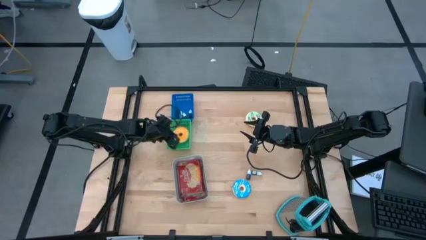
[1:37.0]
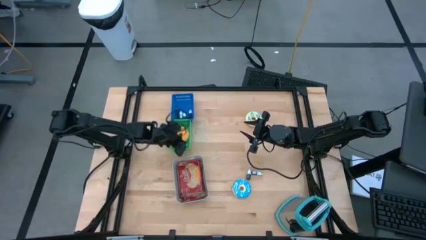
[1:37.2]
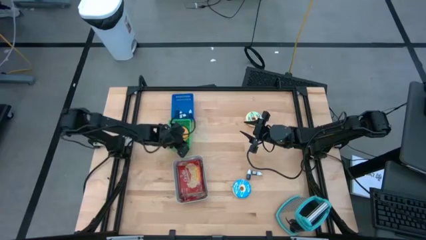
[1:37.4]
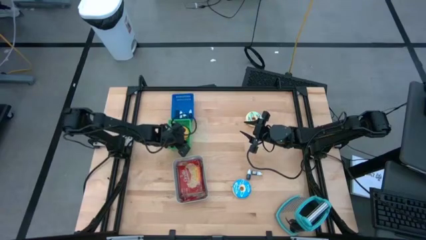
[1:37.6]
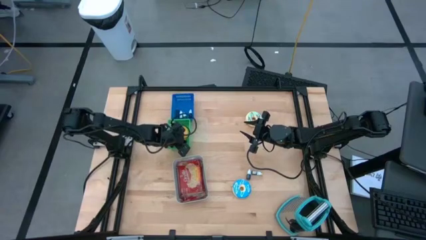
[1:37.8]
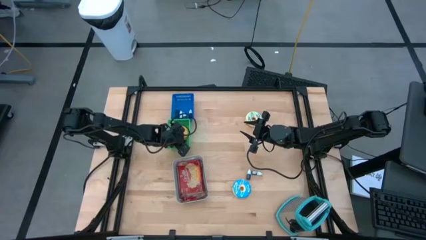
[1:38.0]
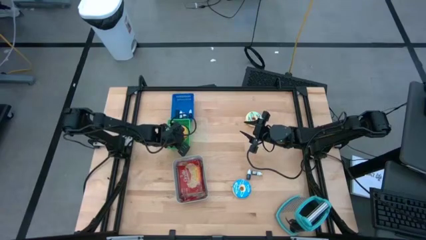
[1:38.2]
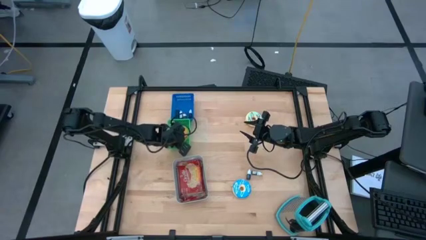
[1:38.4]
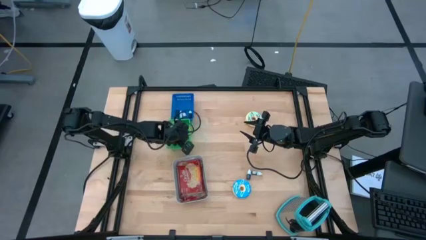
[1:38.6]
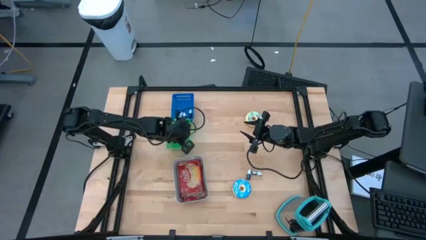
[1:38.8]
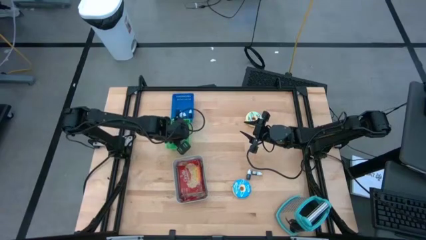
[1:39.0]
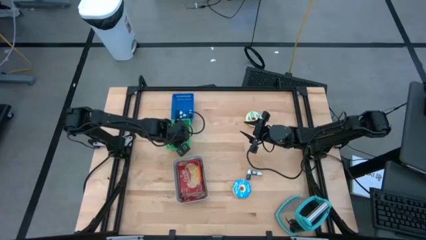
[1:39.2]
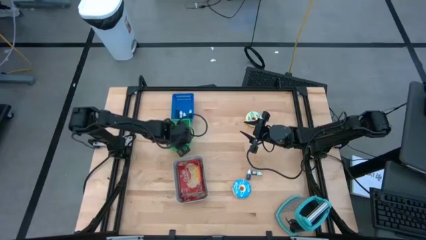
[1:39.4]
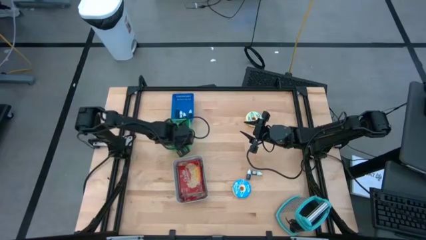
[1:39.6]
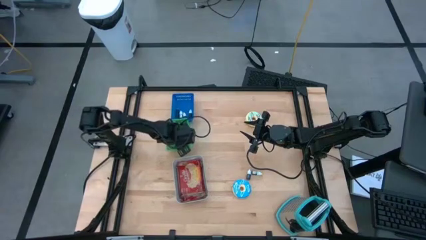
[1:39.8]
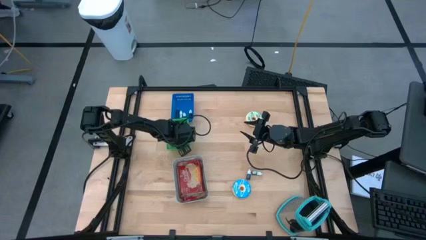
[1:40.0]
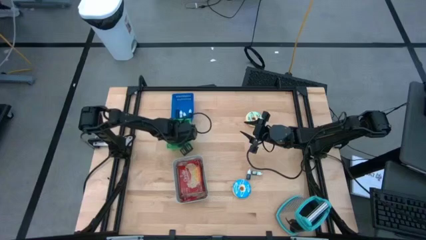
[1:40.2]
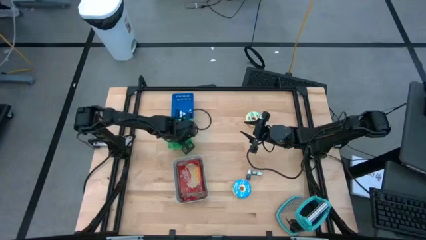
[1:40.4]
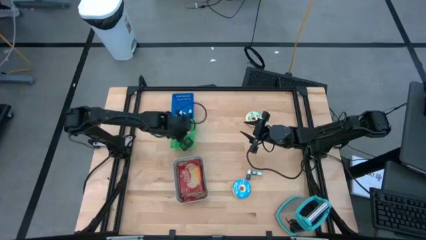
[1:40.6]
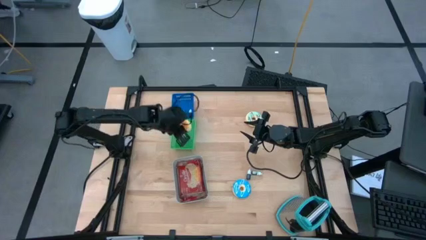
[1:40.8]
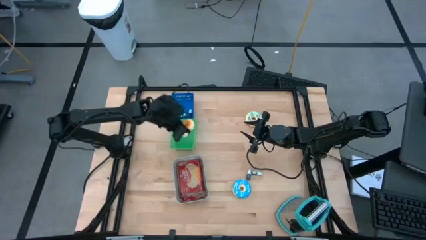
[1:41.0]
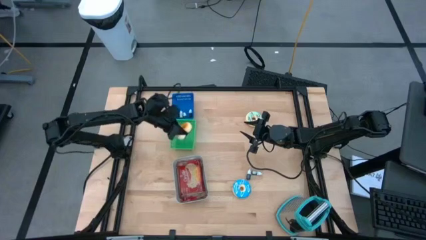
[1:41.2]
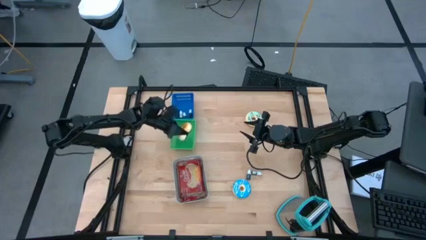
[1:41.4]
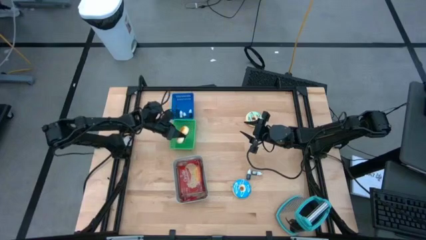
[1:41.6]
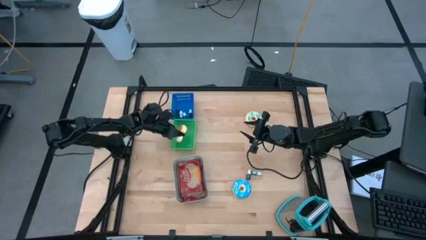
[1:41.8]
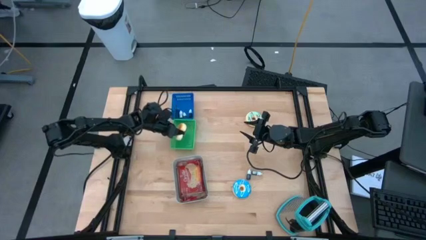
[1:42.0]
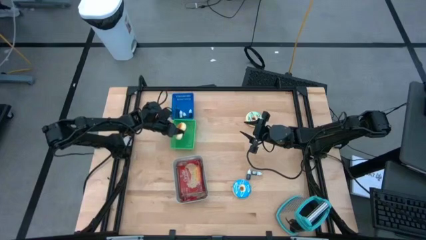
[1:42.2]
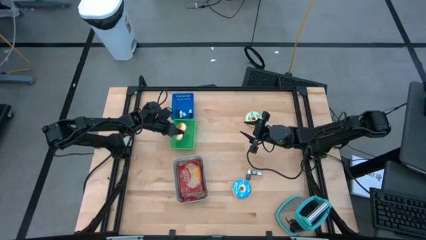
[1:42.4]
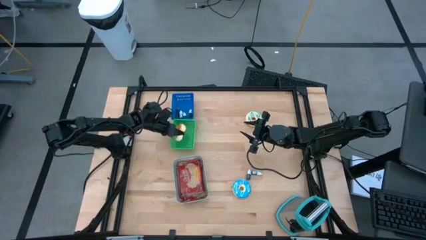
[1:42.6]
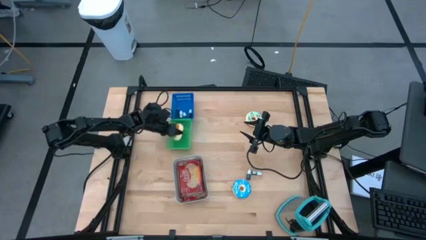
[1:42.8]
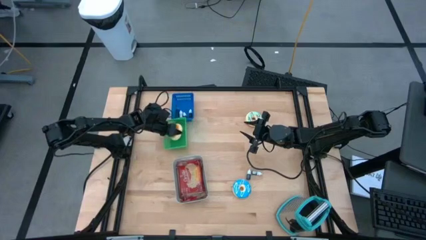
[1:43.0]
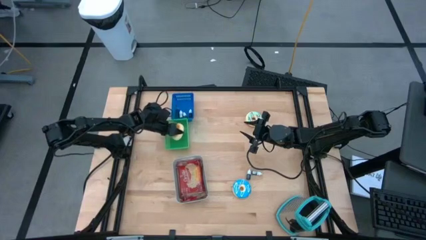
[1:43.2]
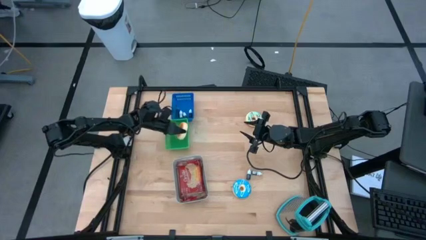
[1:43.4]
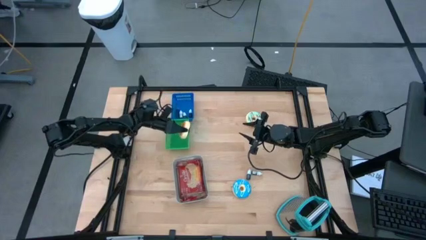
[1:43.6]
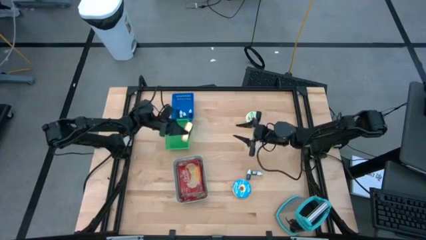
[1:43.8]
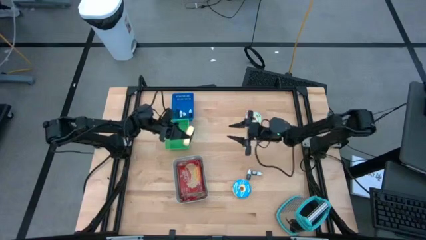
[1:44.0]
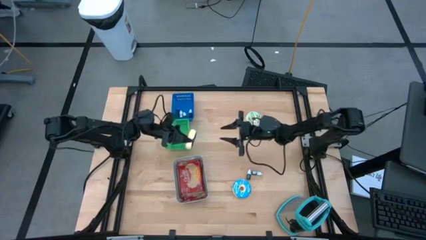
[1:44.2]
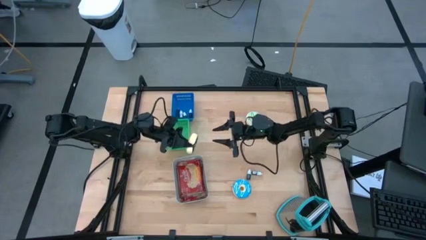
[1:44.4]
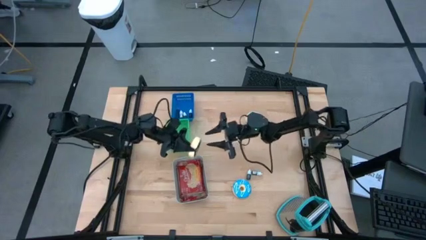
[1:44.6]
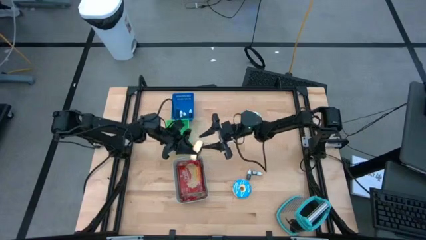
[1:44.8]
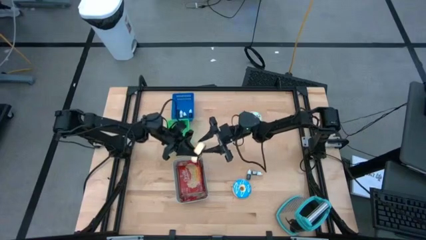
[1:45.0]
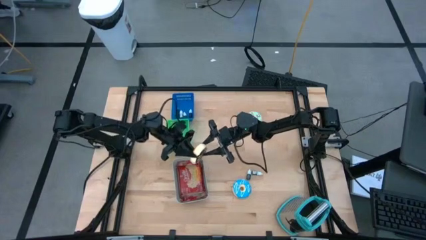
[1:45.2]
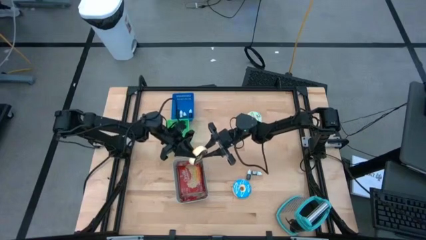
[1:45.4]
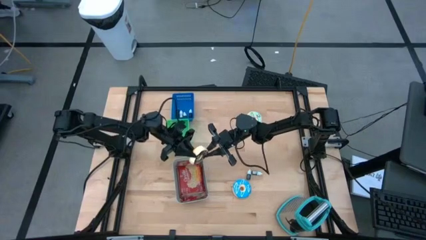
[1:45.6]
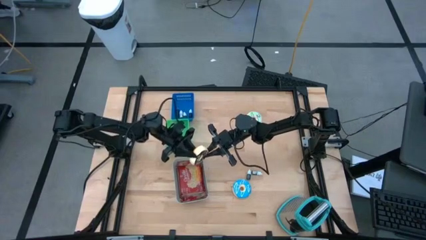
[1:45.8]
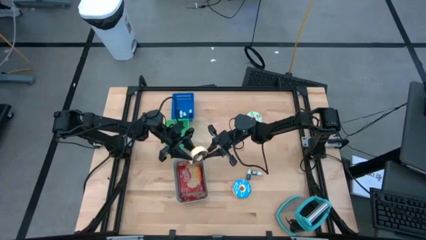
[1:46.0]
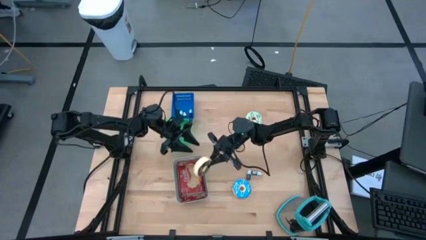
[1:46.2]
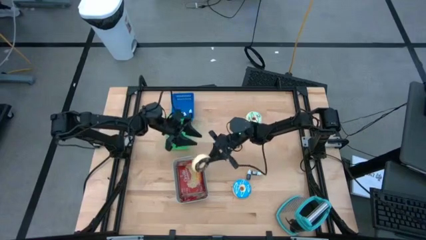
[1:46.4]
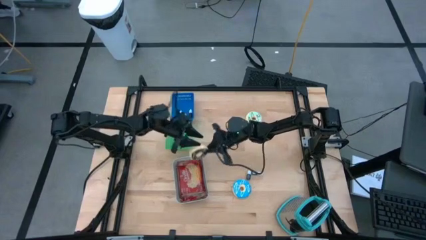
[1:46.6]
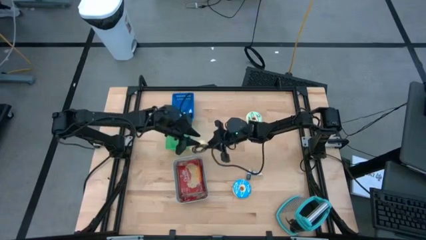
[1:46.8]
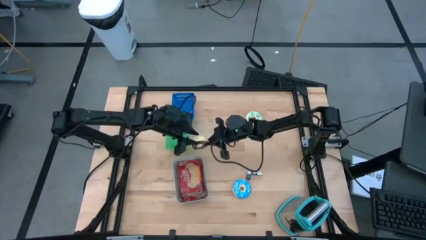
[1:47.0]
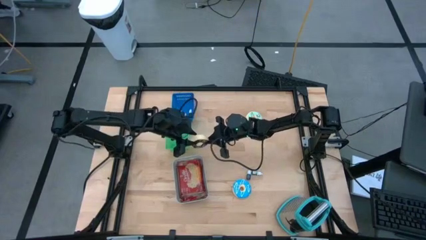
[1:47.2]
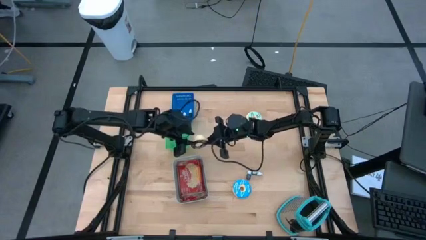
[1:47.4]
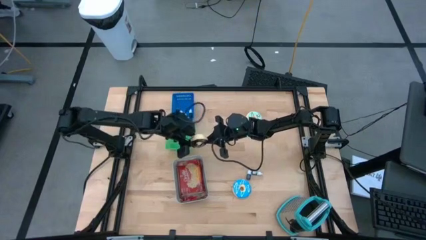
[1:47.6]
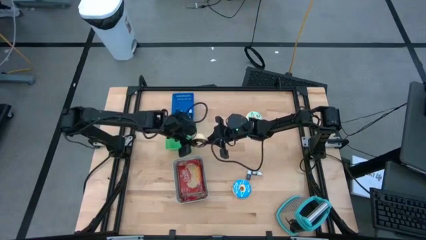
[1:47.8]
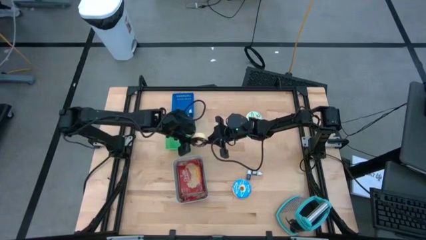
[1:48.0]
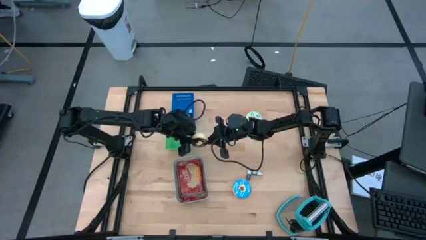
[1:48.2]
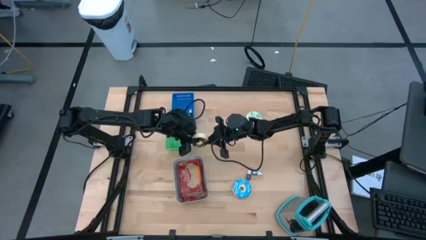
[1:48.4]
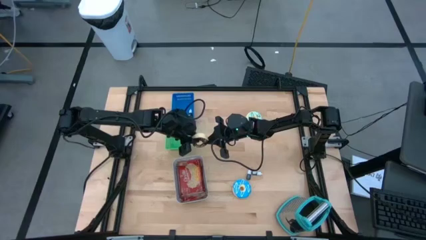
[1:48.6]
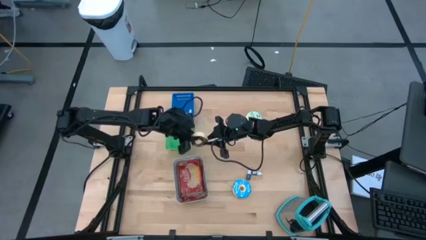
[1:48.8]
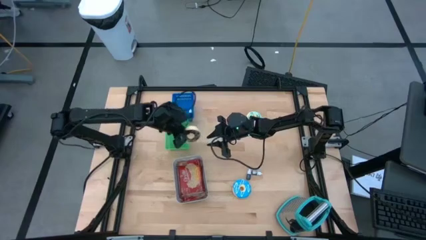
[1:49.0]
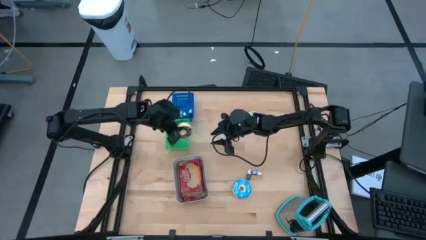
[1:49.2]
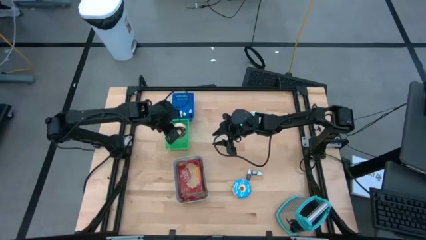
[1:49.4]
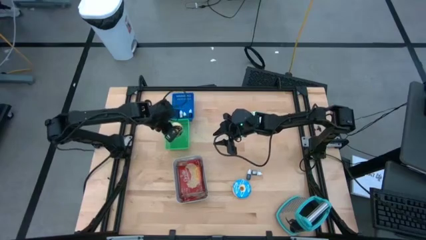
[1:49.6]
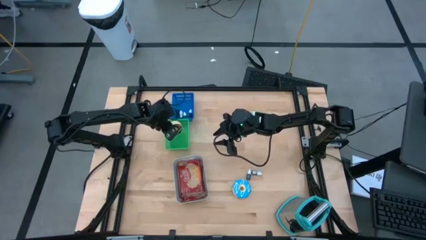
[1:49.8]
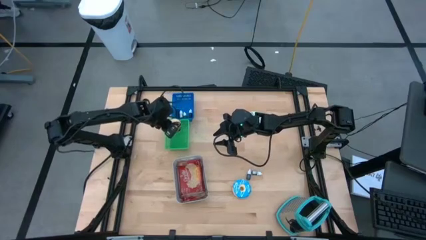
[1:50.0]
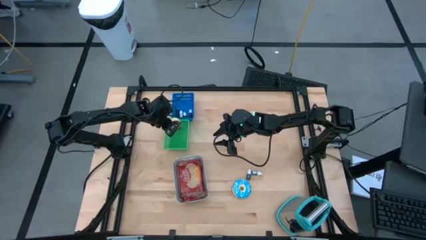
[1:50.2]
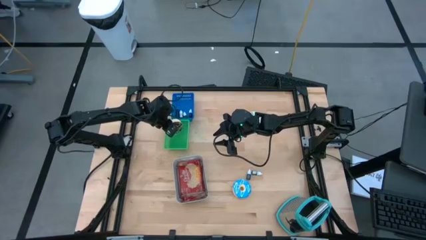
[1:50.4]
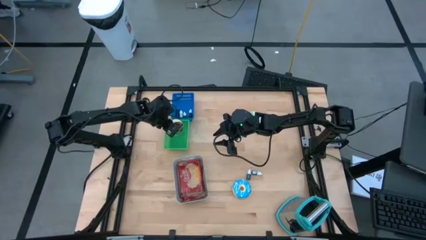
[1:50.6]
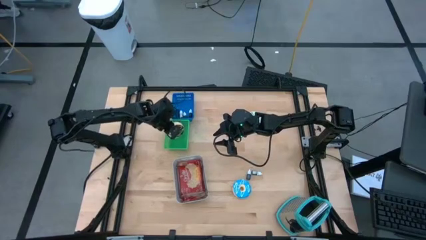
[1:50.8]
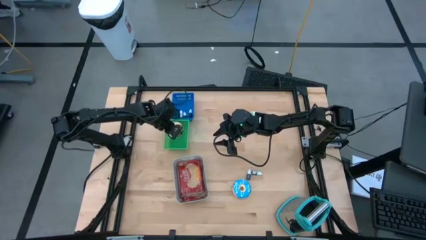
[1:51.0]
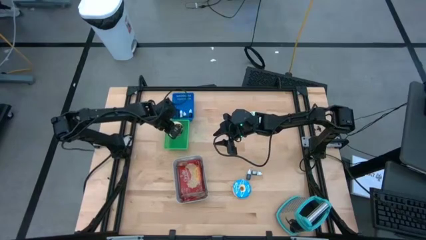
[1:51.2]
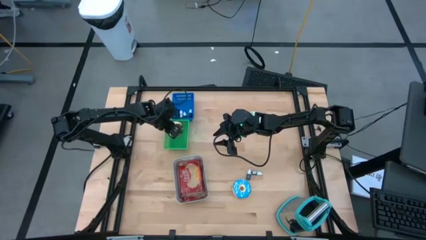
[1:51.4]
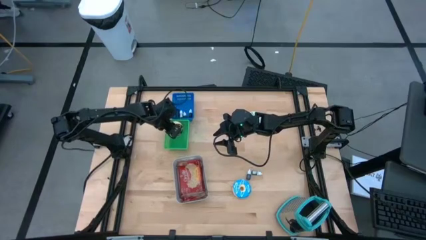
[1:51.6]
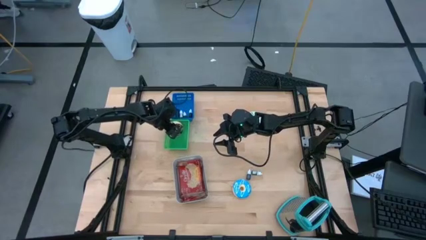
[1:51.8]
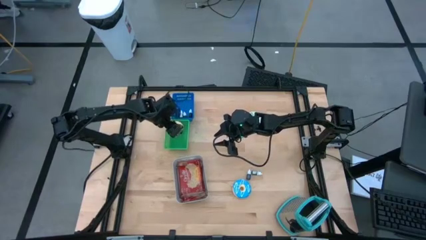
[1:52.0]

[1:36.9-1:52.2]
Task: Pick & Place Food Item
Put the black donut into the green bin

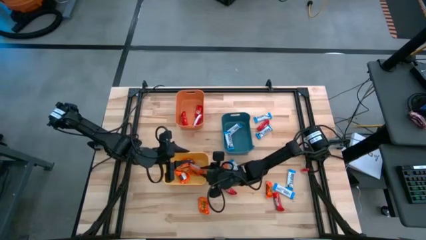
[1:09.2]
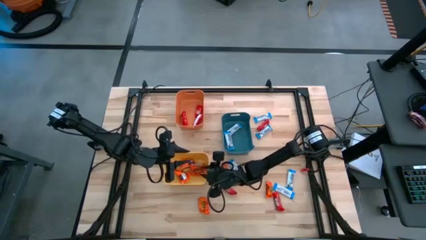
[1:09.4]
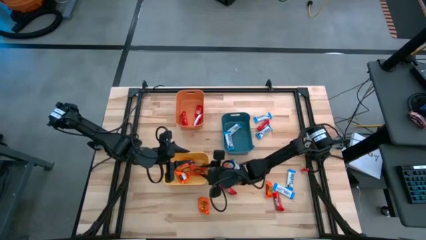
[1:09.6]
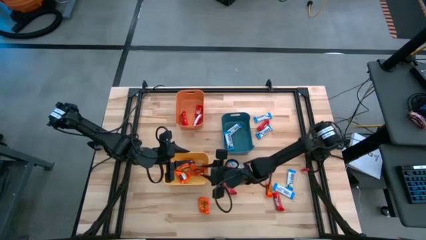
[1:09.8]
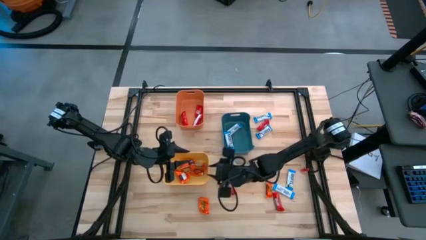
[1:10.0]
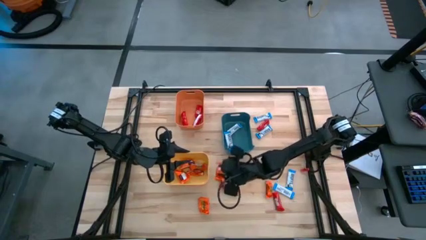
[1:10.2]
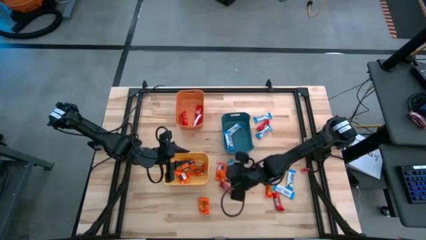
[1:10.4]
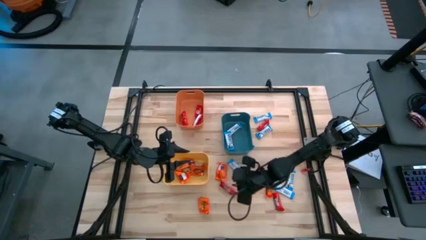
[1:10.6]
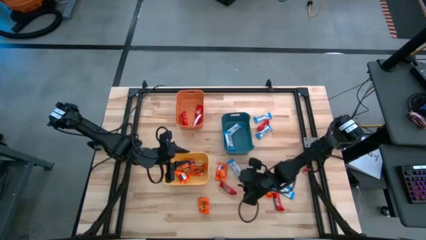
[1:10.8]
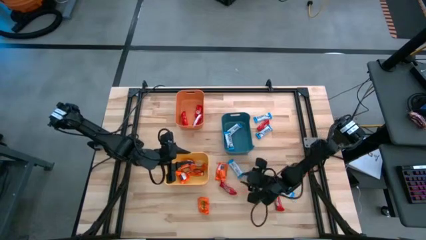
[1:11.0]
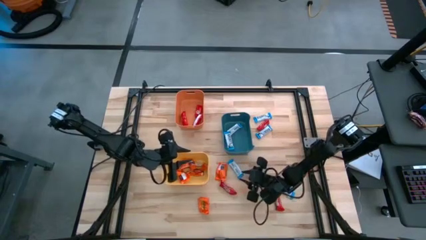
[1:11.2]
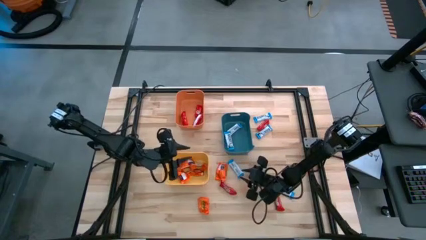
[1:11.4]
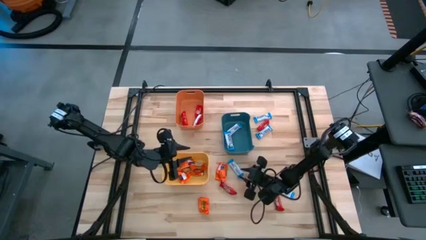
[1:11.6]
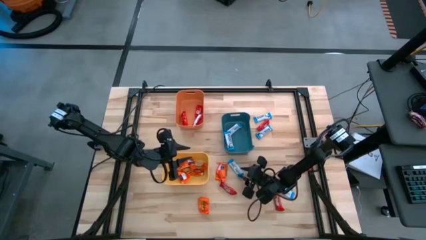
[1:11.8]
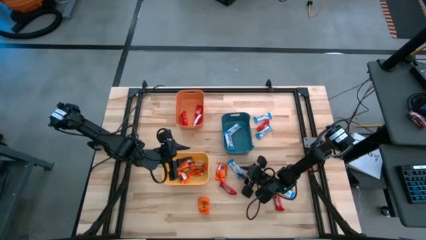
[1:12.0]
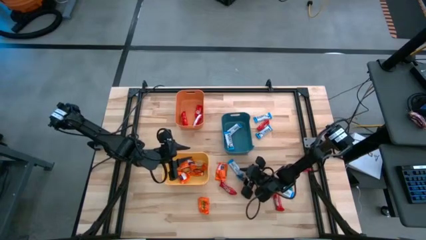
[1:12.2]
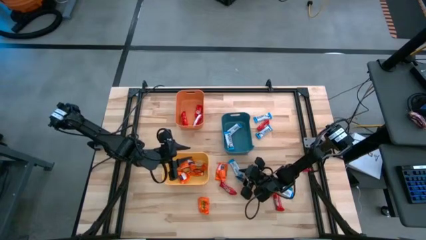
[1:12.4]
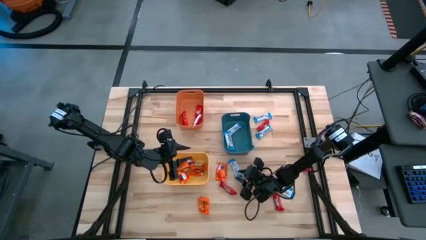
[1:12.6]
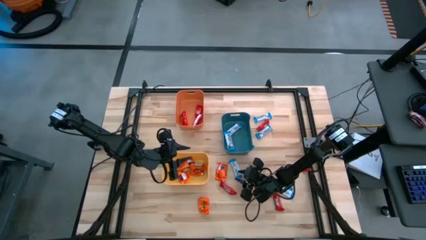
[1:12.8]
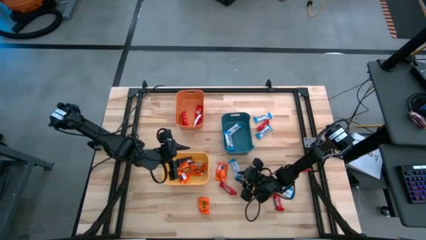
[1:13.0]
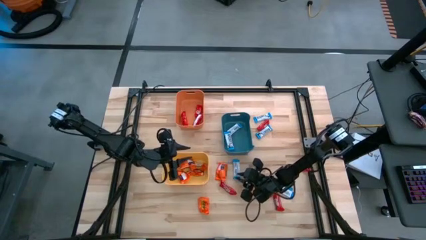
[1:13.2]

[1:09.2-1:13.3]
Task: Organize candy in baskets
Put the white chocolate into the blue bin
